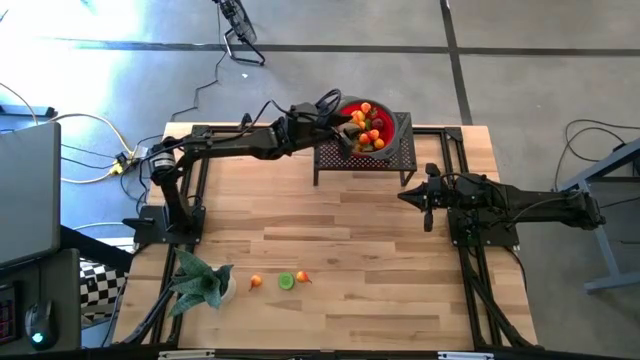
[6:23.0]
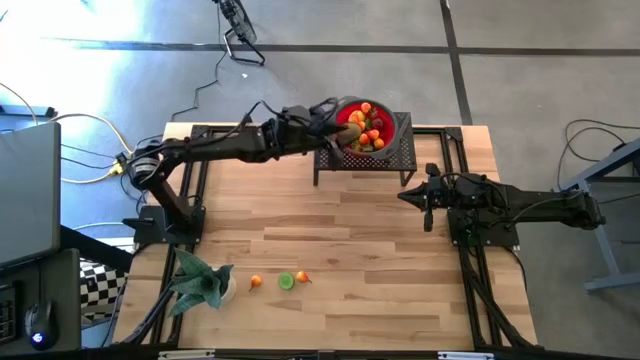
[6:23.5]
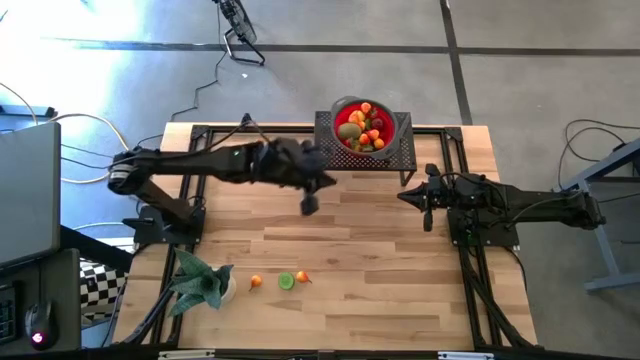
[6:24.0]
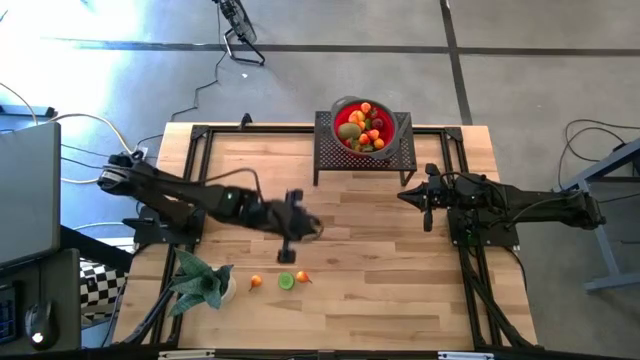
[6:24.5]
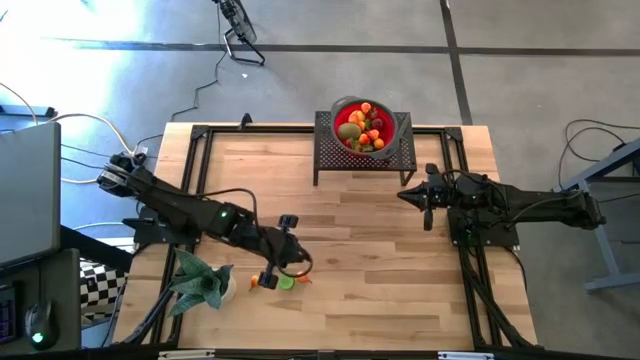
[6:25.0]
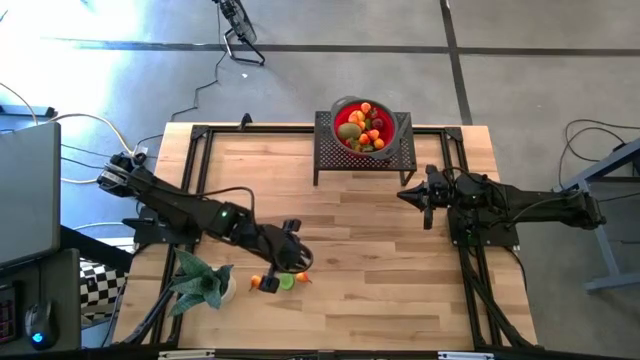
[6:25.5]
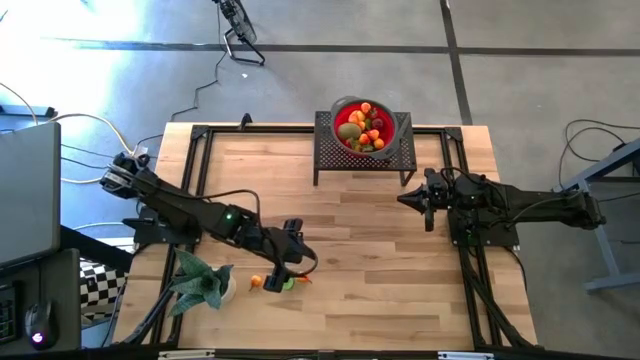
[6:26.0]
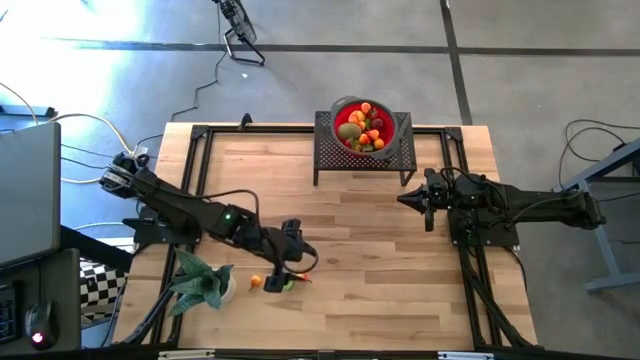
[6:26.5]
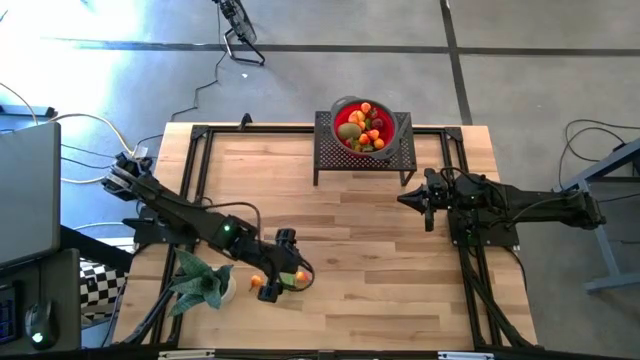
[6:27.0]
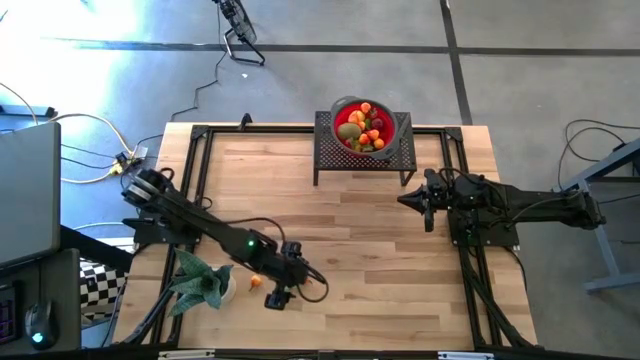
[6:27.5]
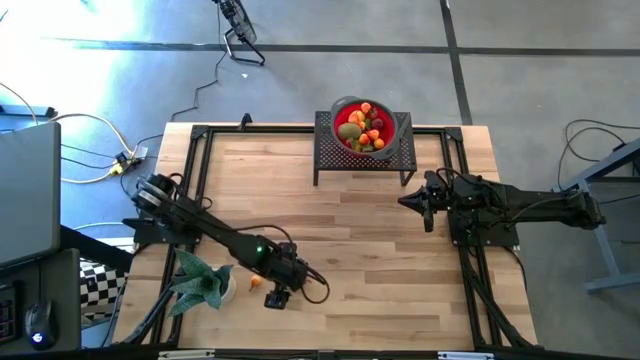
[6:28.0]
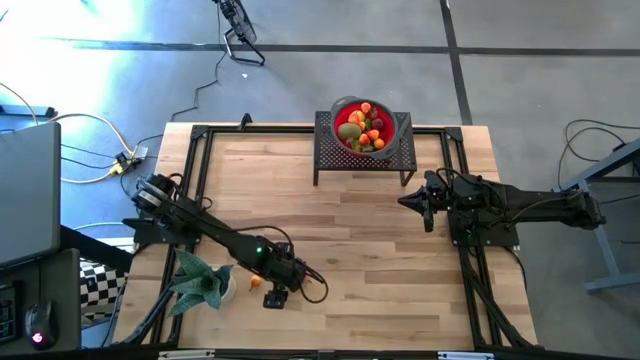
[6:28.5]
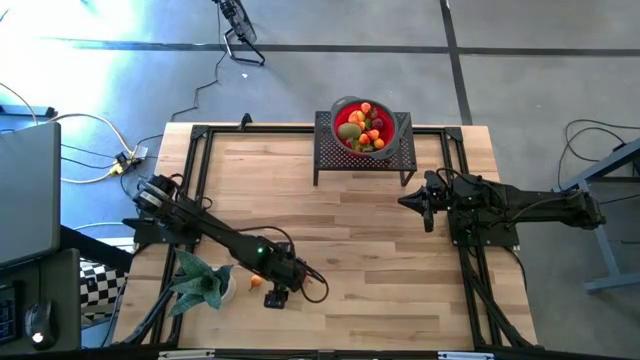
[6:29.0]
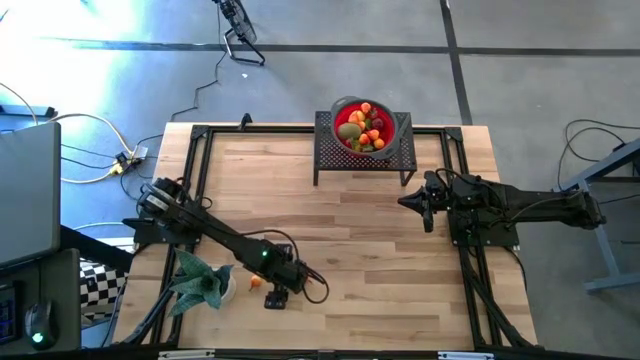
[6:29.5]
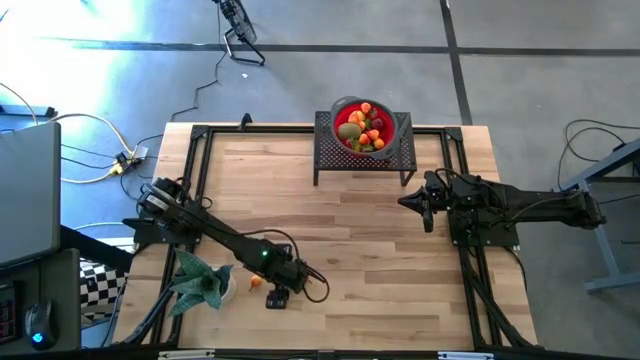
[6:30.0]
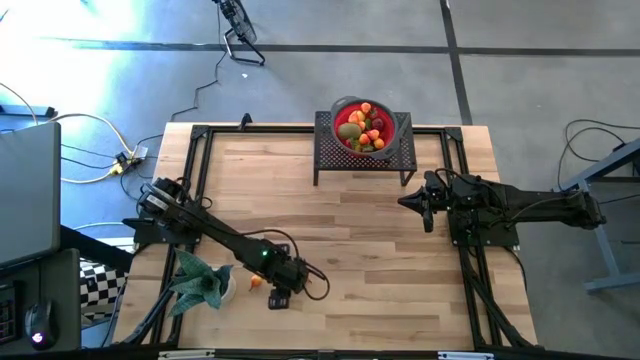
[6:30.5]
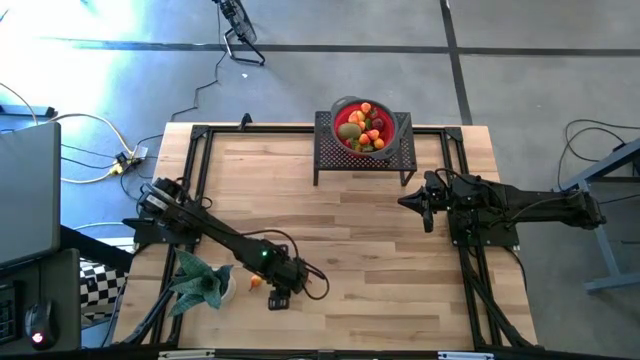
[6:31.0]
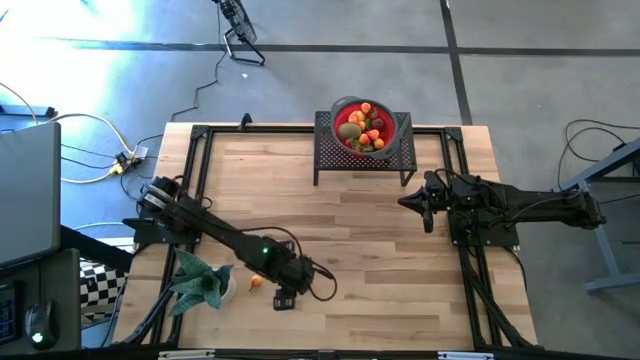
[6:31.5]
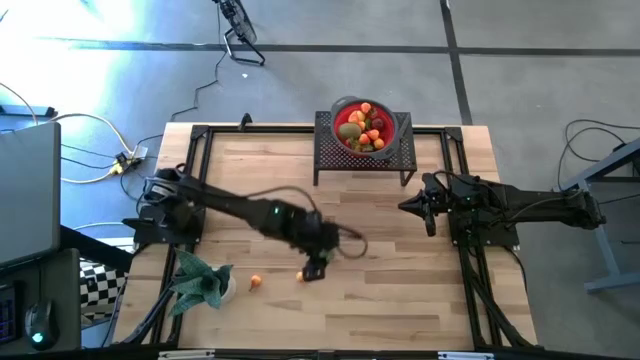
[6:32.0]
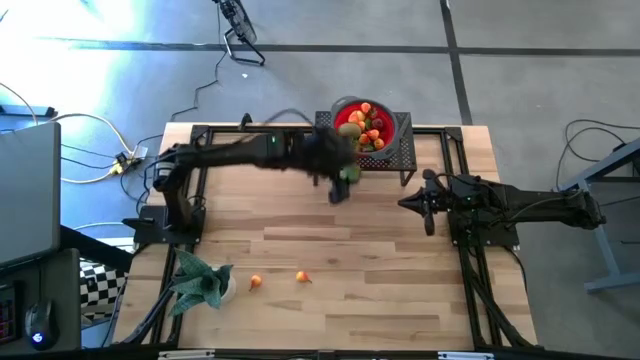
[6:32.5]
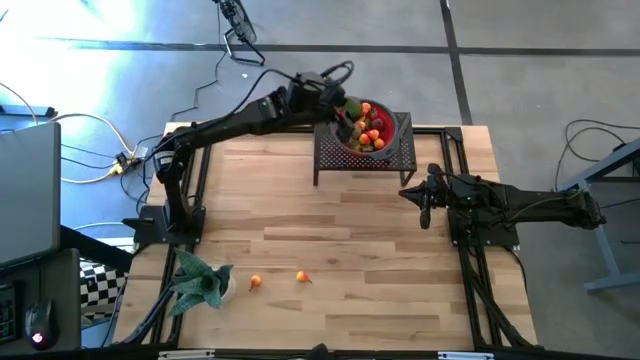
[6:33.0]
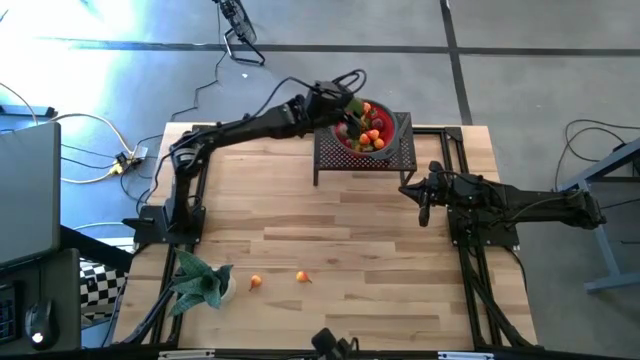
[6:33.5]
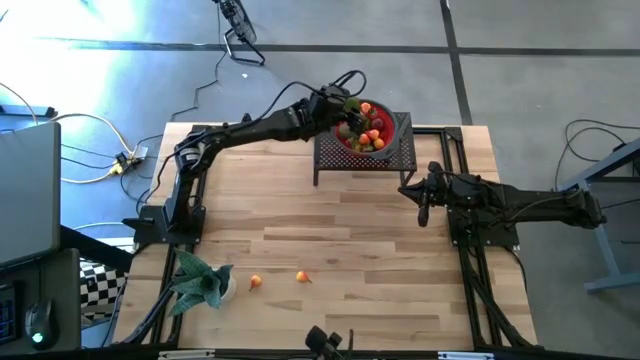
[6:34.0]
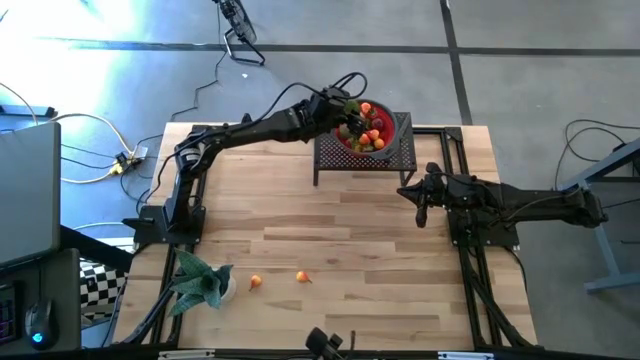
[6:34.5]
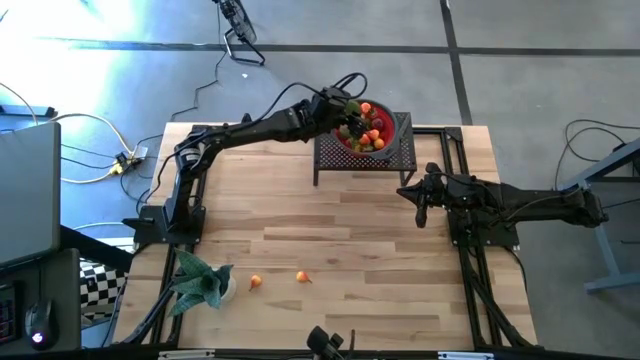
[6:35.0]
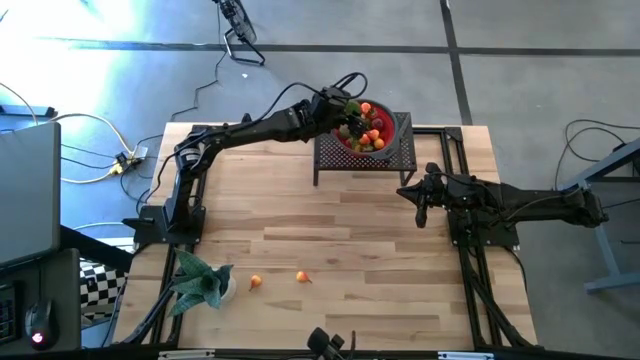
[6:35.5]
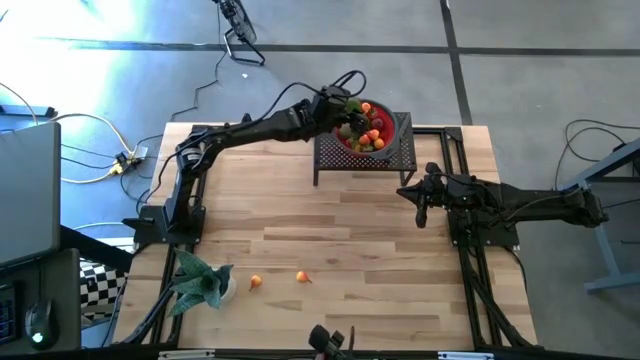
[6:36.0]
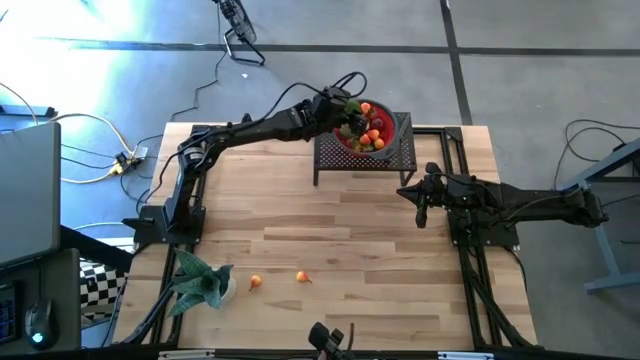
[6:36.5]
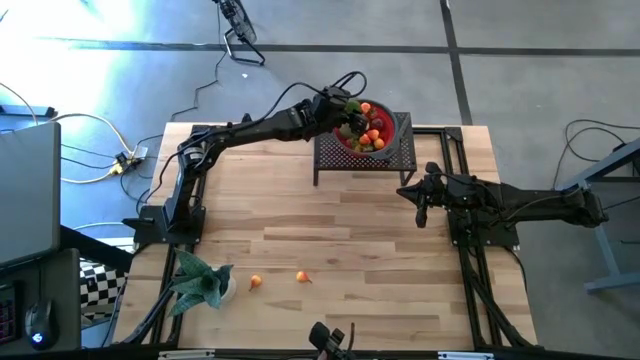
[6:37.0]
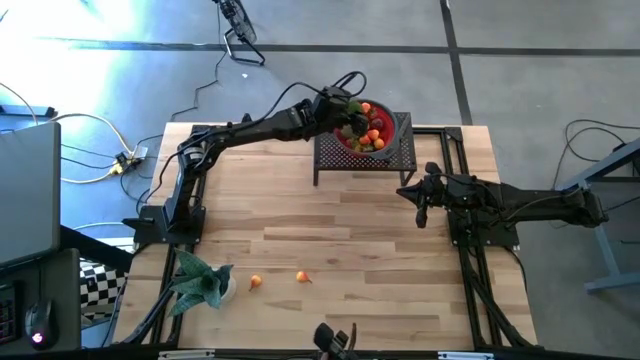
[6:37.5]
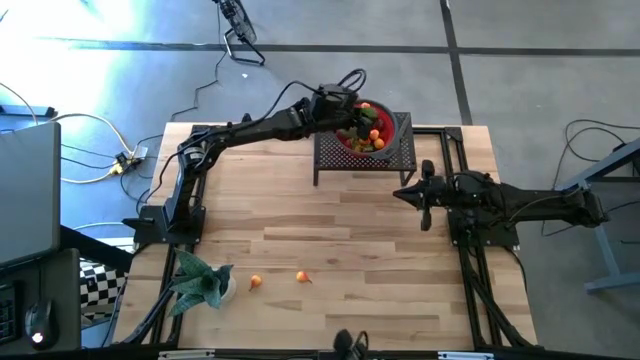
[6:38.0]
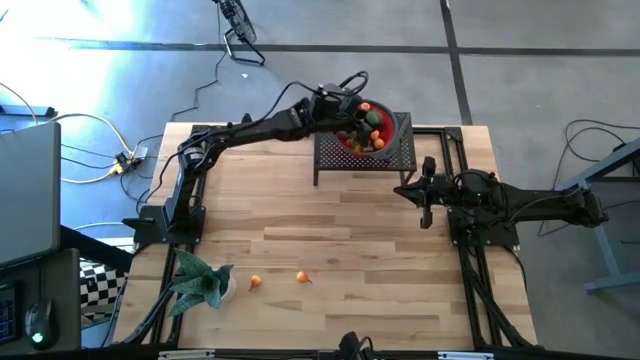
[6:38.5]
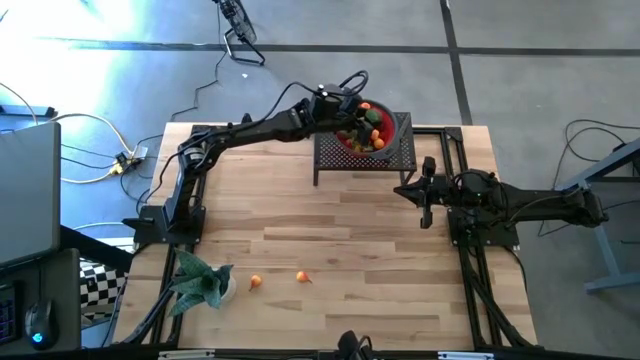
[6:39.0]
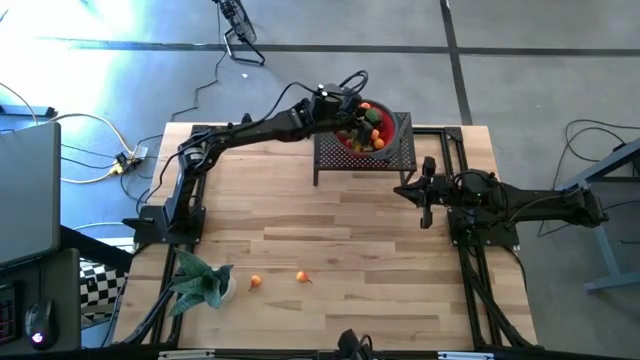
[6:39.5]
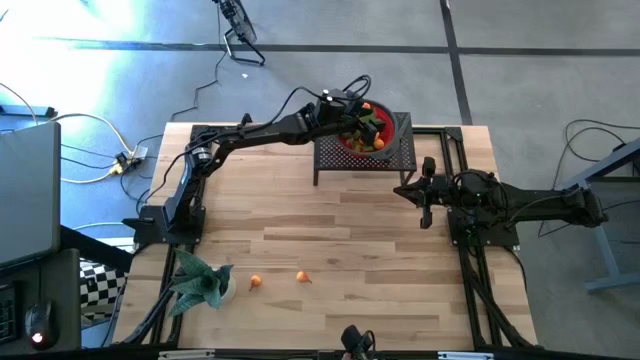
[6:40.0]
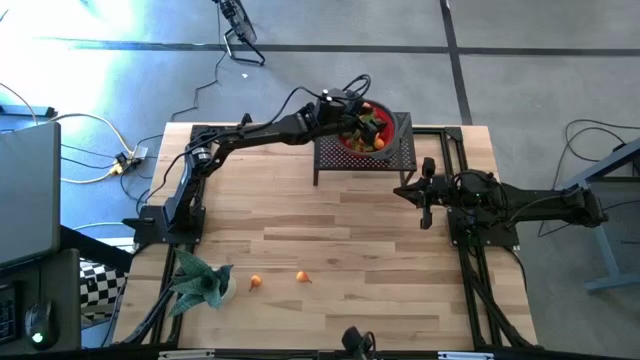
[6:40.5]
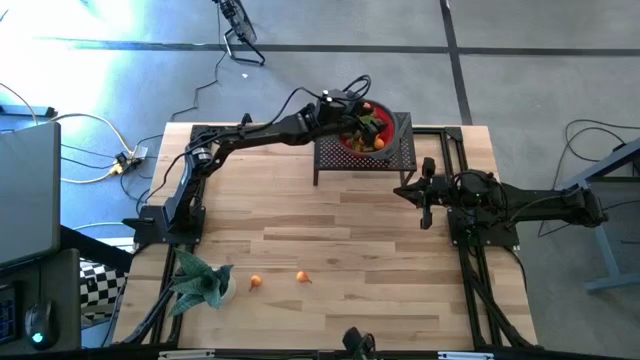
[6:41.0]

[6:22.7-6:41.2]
Task: Pick & Place Fruit
Put the half kiwi into the strainer on the shelf

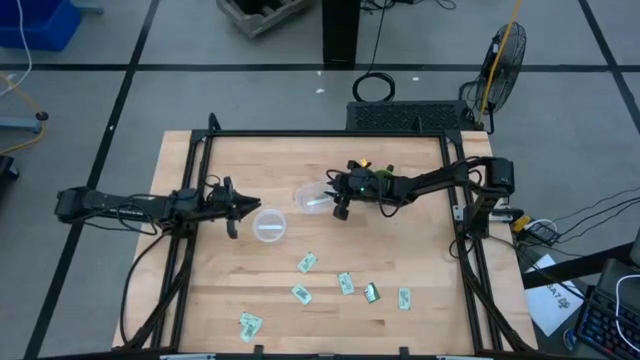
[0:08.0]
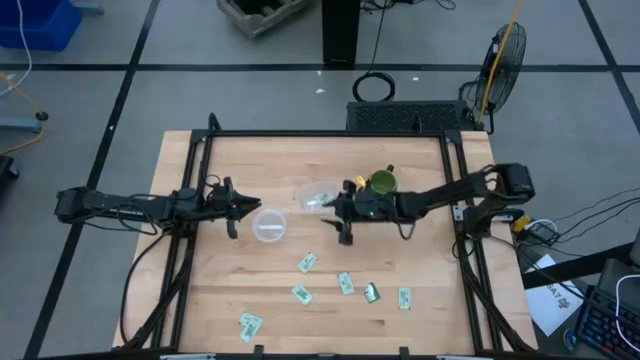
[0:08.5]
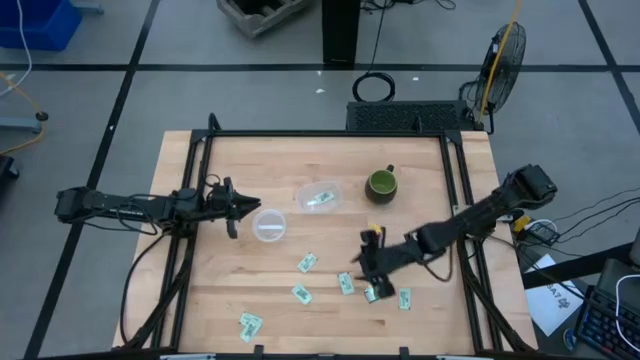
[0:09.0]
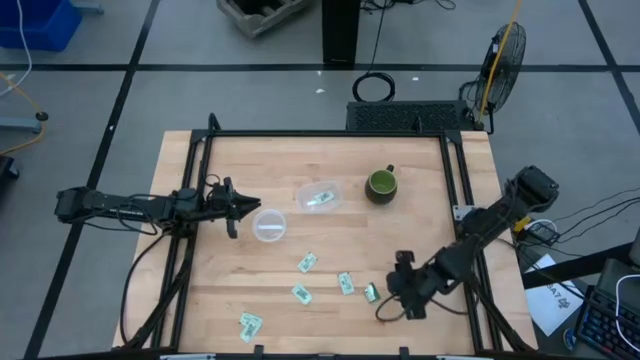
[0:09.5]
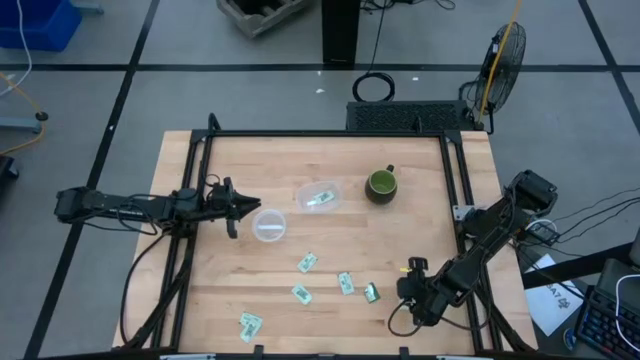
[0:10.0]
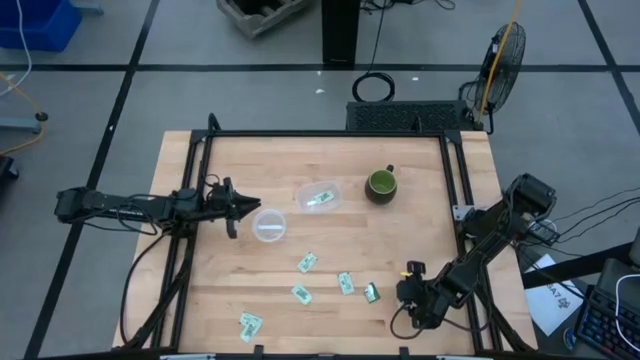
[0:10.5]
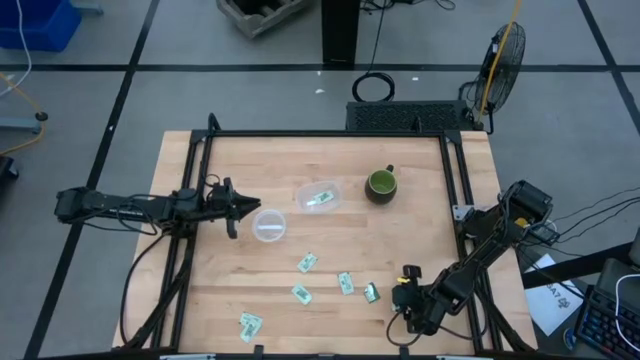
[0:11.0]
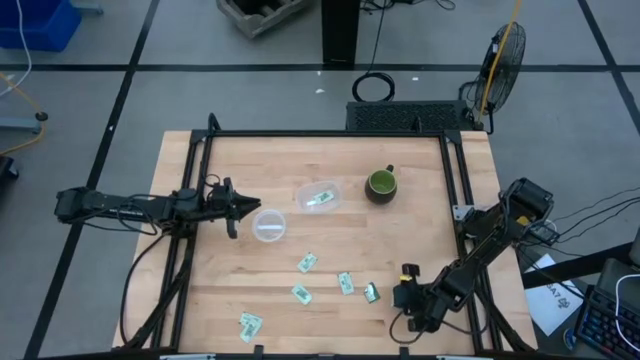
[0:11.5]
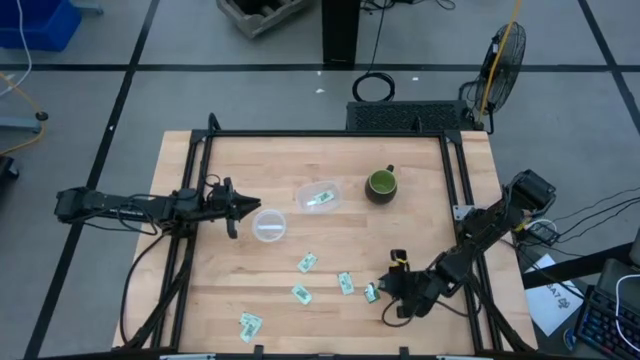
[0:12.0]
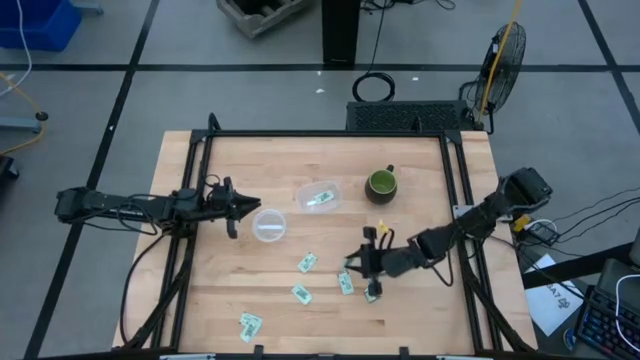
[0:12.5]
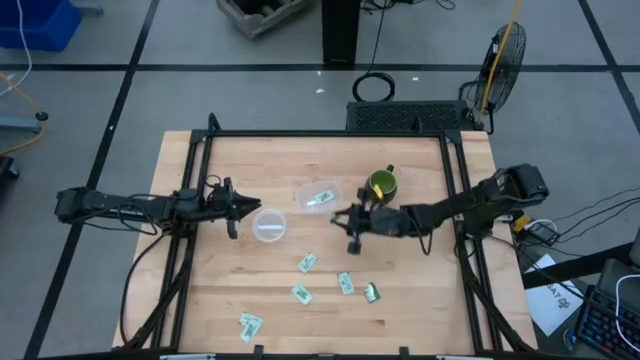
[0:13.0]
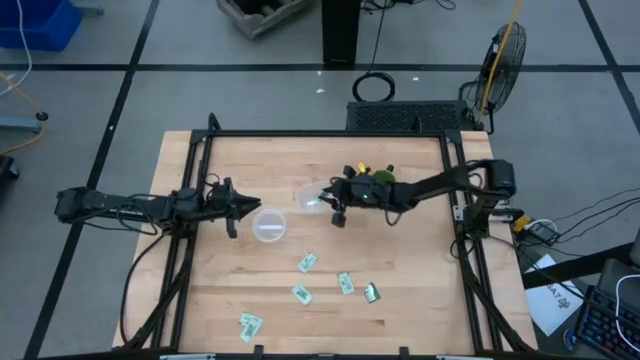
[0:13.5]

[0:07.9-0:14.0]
Task: Pick and place Stevia / Truvia into bins
Put the stevia packet into the oval container
